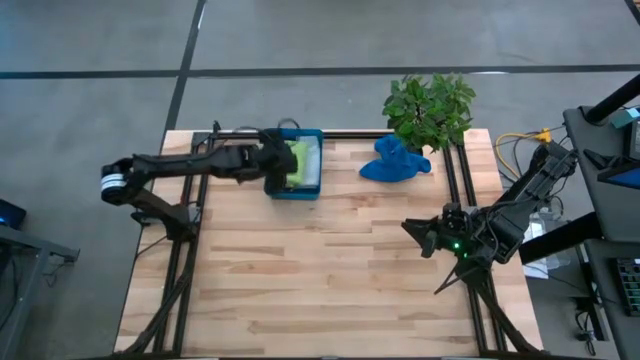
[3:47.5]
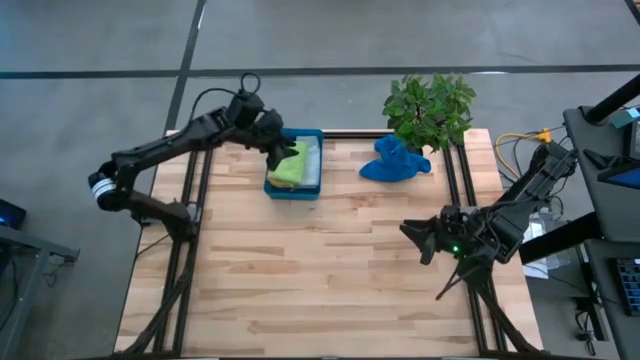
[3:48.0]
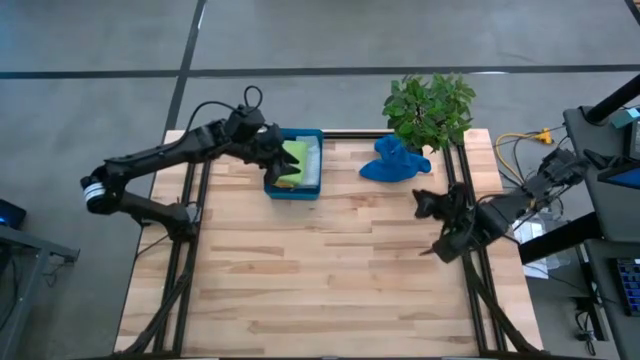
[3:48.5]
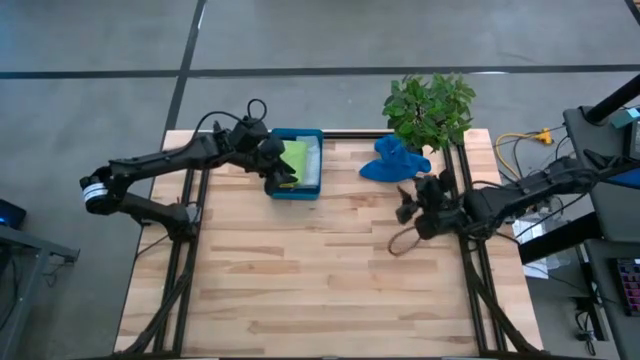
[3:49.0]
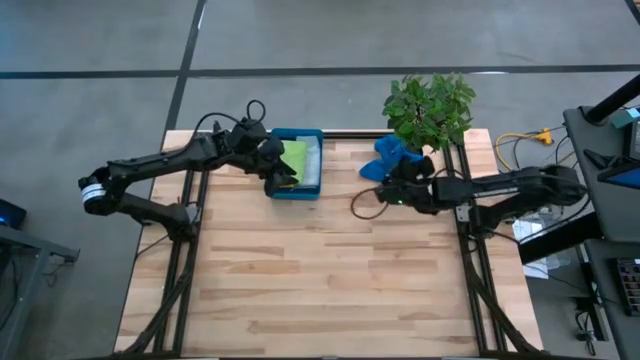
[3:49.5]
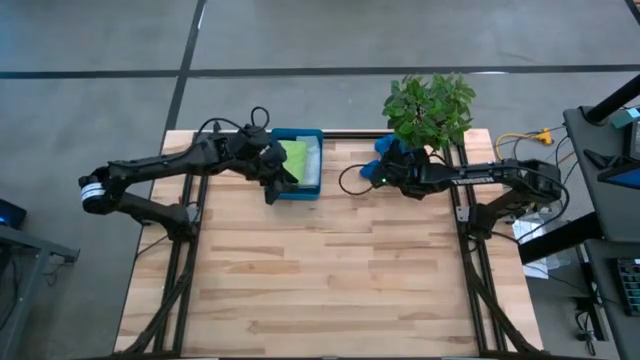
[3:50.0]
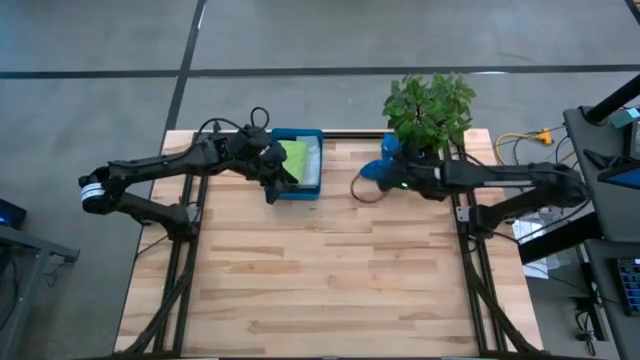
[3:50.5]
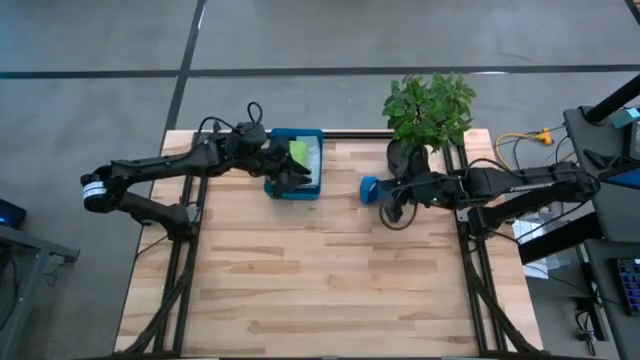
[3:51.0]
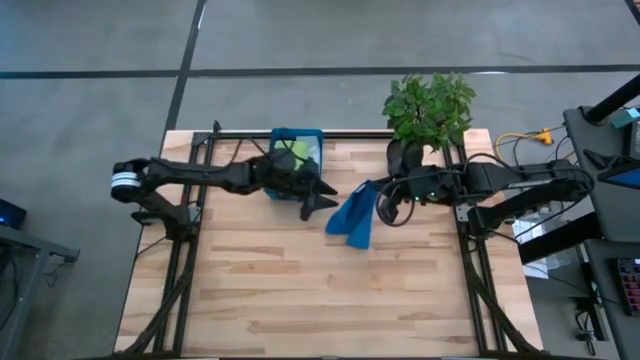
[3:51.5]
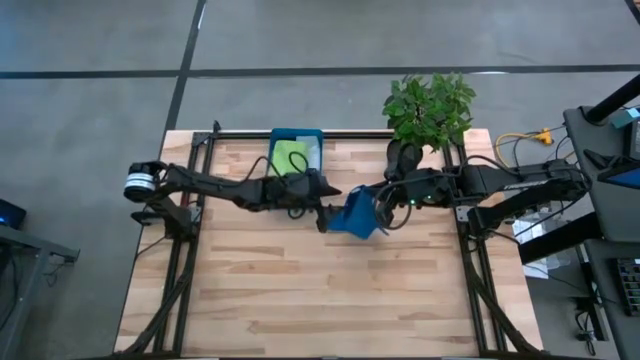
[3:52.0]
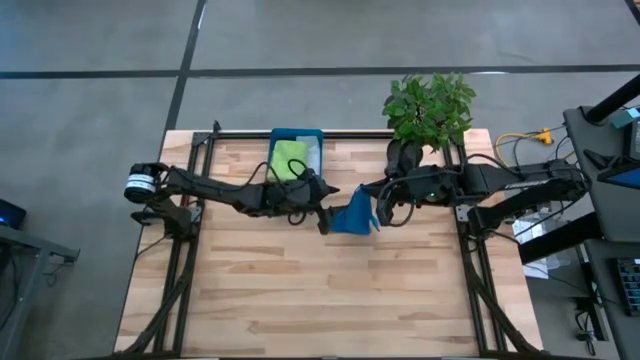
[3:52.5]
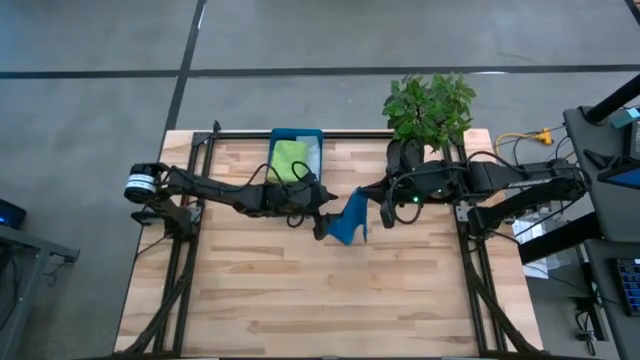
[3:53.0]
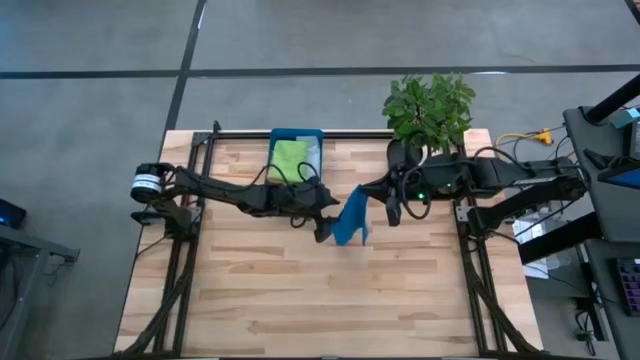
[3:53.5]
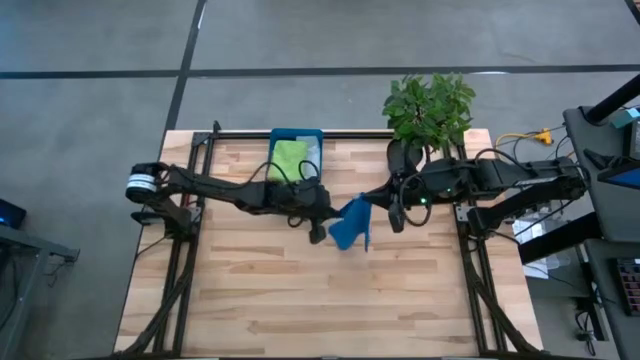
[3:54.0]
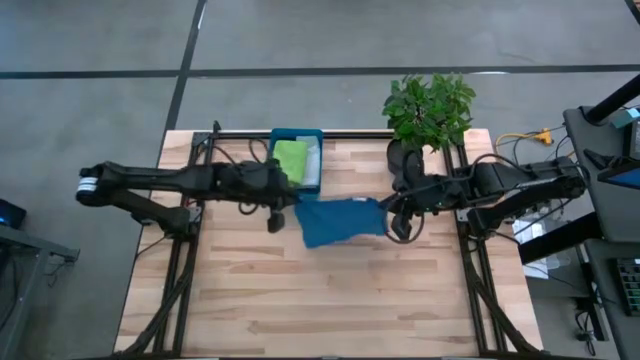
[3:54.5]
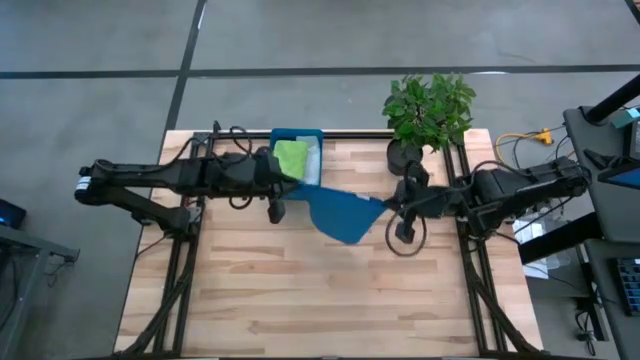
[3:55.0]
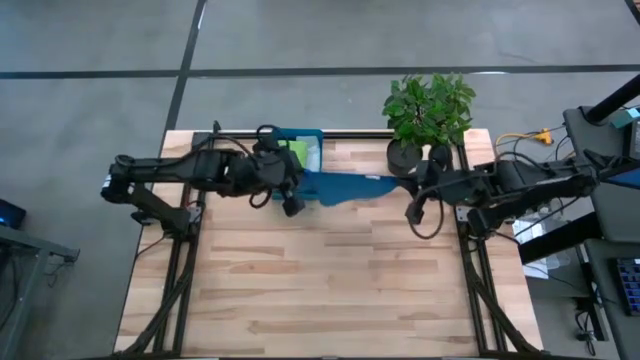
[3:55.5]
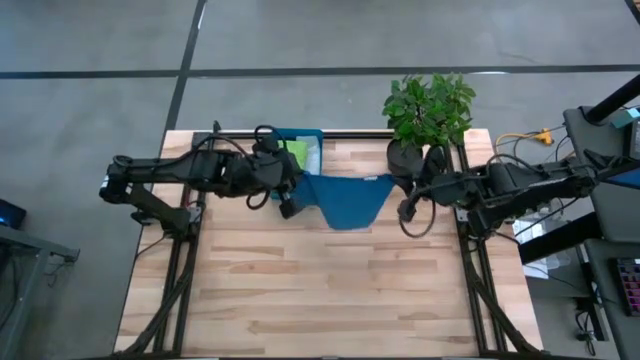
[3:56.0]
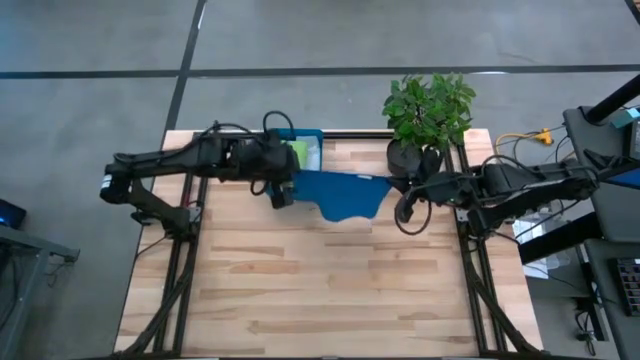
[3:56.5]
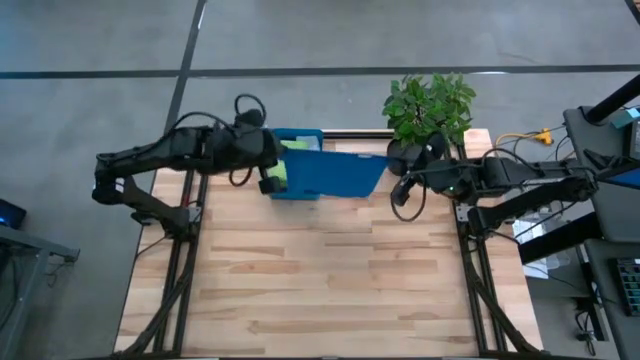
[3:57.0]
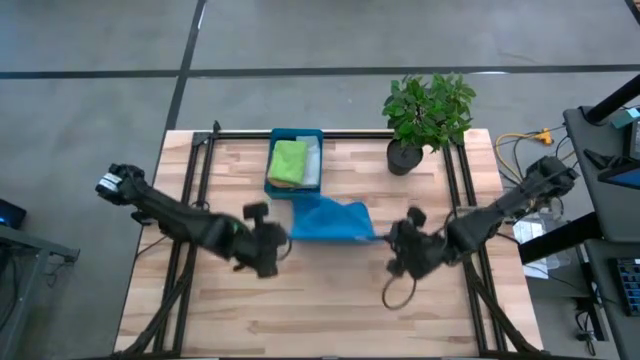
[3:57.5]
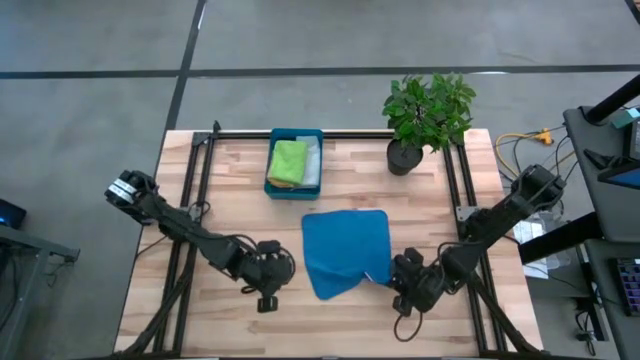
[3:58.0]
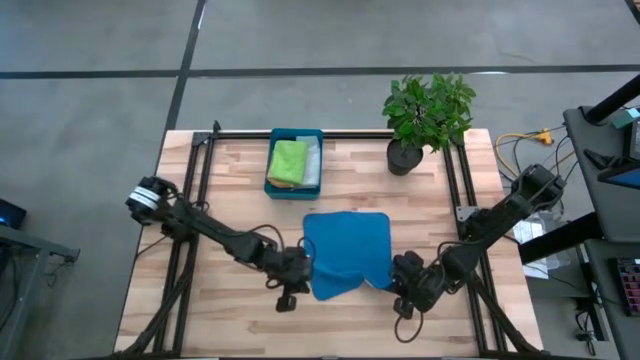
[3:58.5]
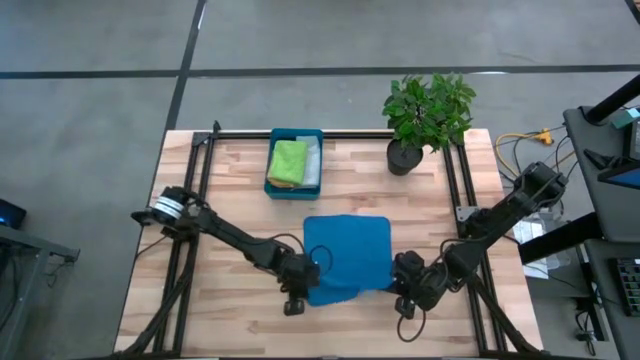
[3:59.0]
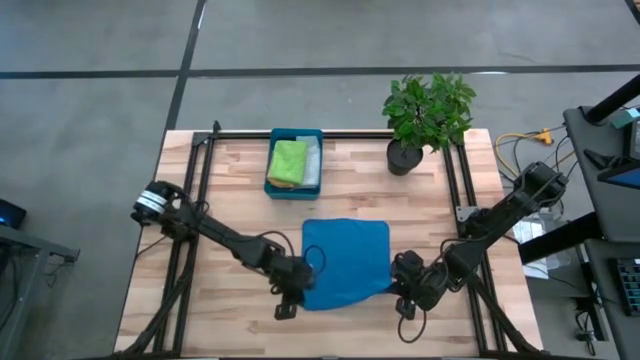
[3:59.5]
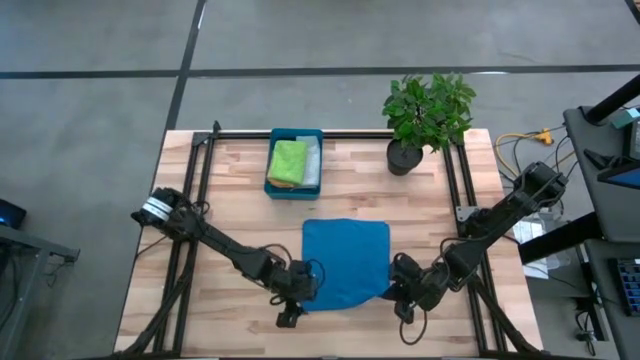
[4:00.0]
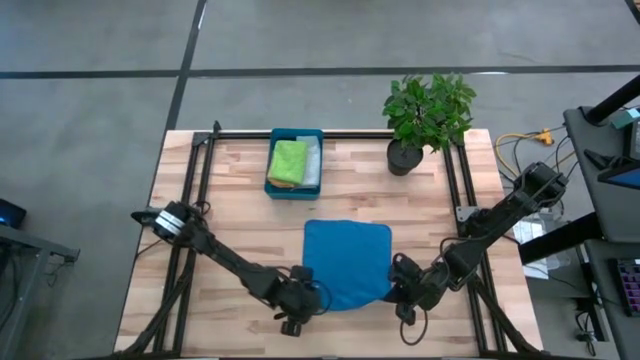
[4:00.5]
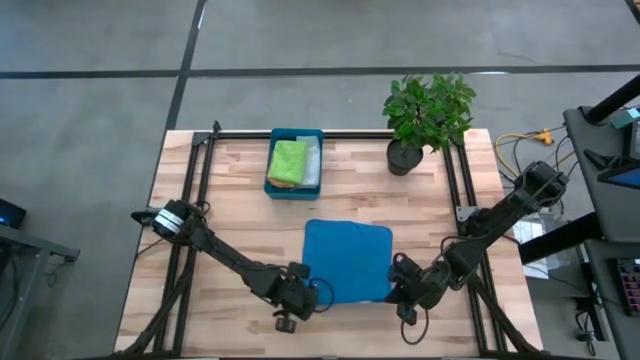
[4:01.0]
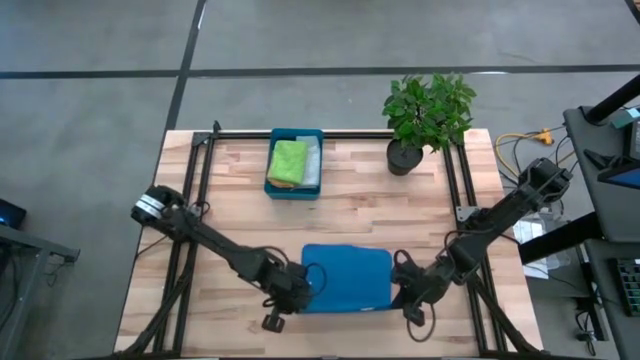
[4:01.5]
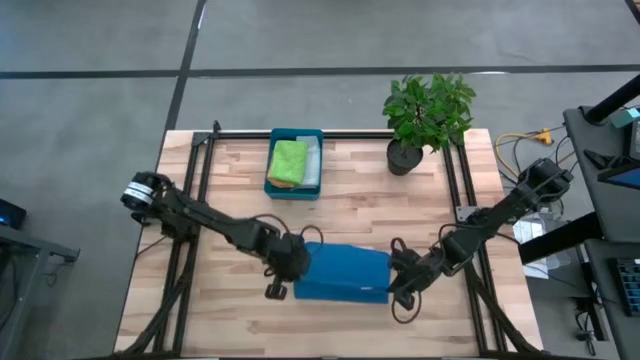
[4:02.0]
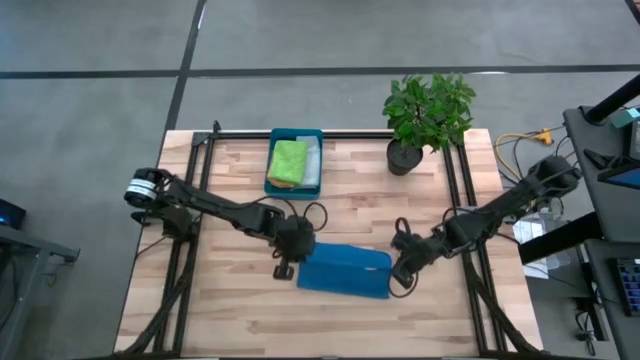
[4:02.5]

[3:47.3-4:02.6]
Task: Fold microfiber towels
Fold the blue microfiber cloth

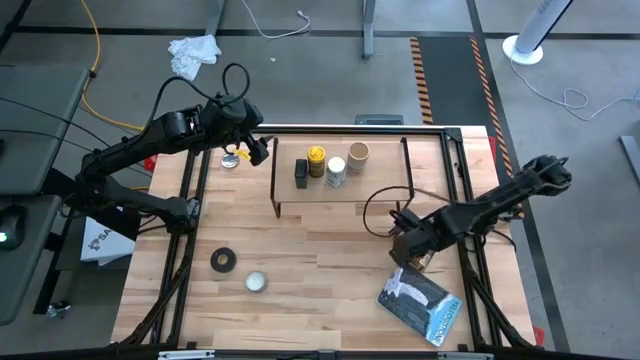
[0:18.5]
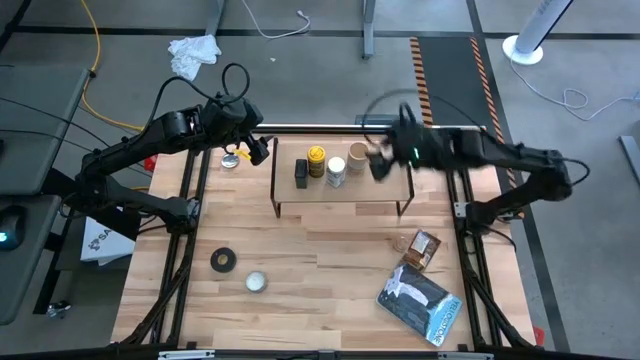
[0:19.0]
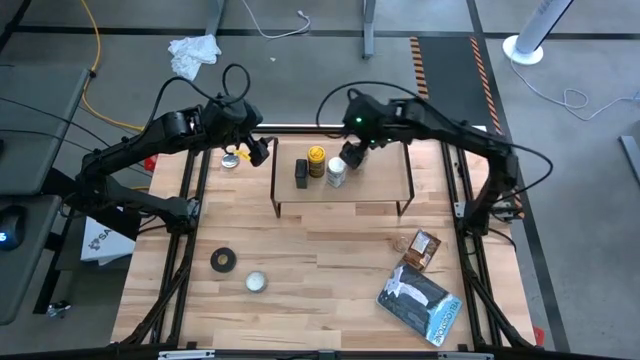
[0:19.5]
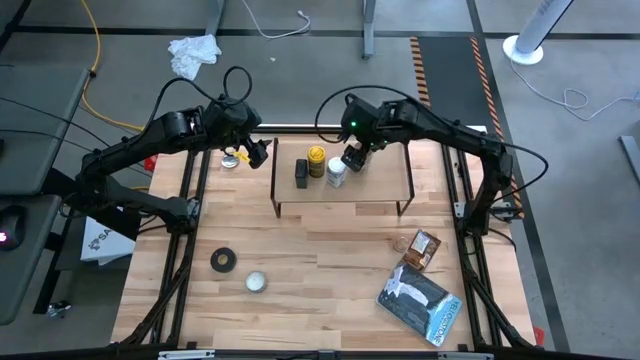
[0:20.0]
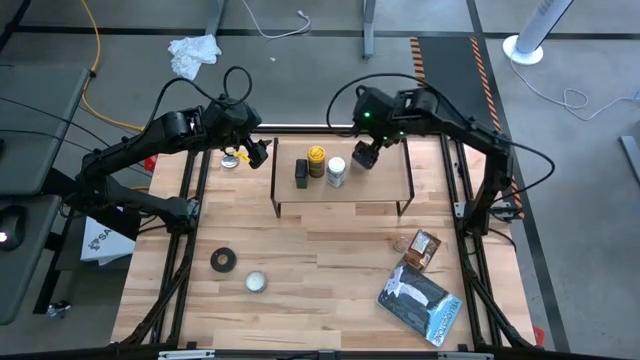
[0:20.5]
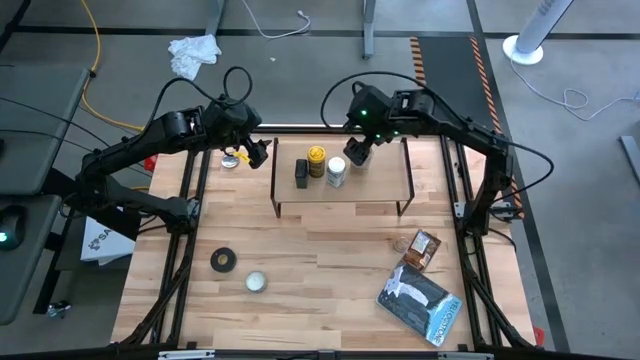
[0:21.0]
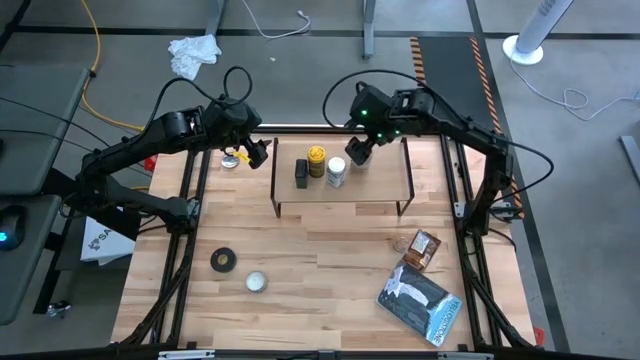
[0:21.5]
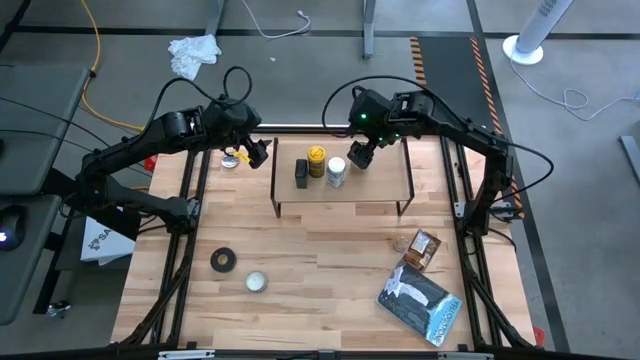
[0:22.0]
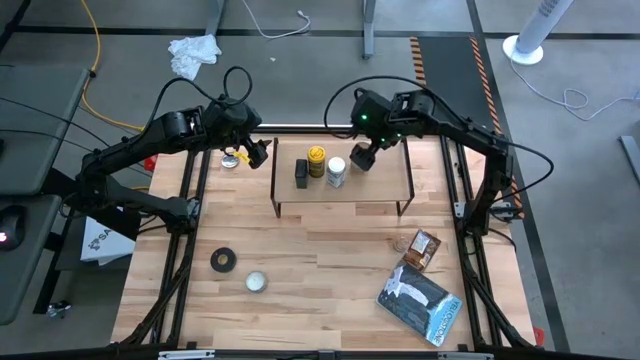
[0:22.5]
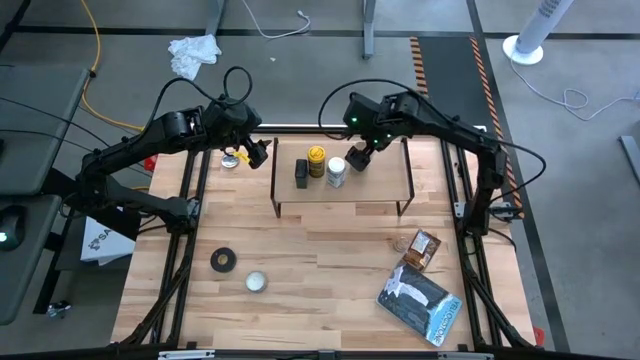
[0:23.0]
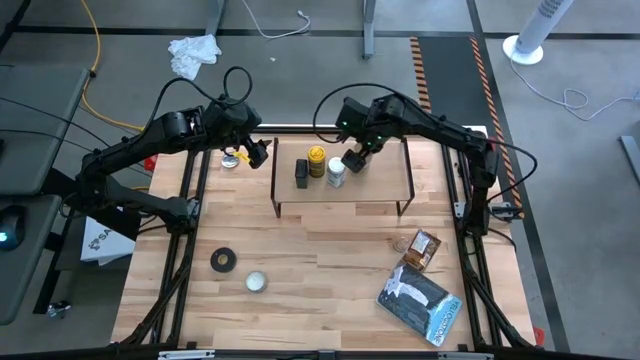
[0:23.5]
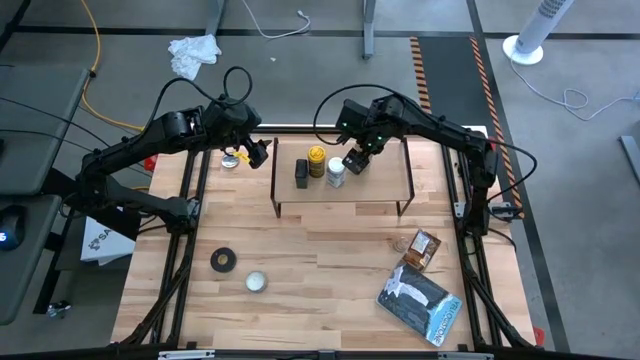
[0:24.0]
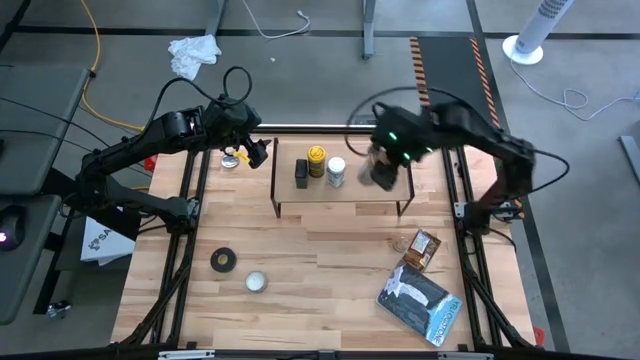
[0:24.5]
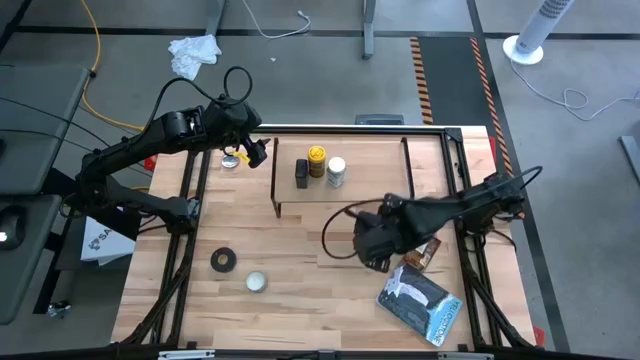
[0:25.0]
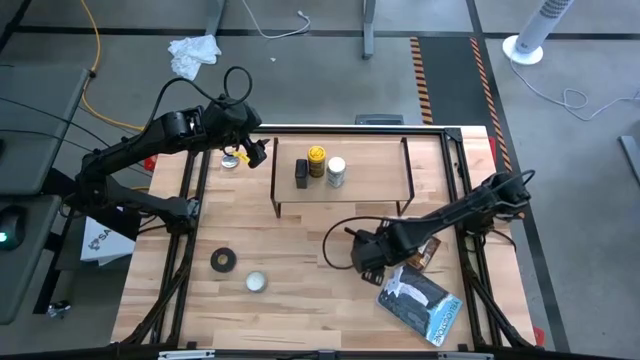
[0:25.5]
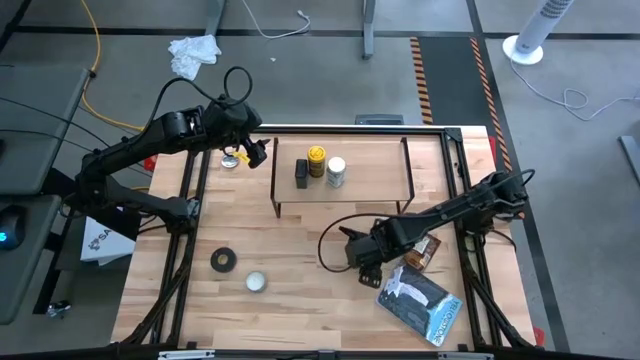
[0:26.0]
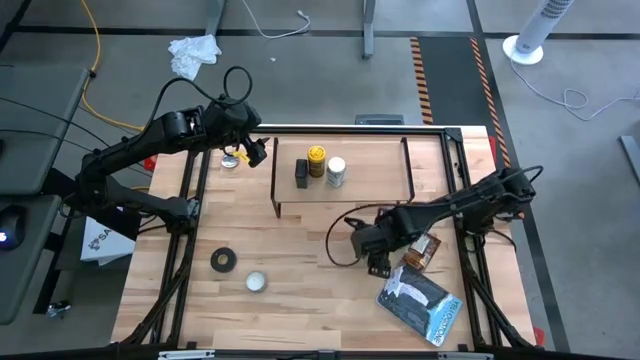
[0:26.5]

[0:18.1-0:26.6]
Task: Shelf spices
Remove the gold seasoning bottle from the shelf
